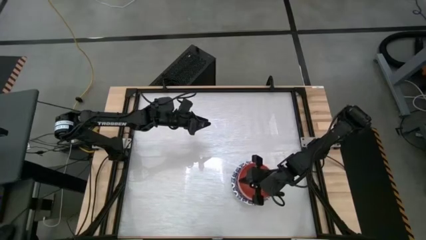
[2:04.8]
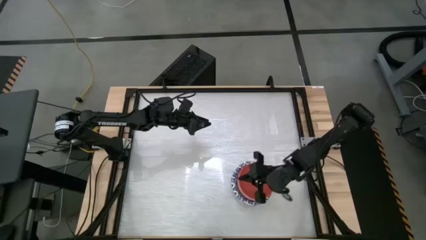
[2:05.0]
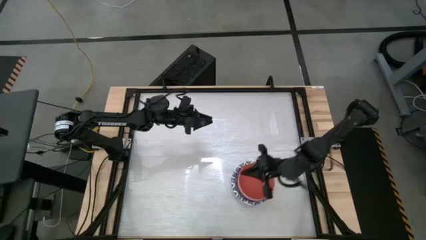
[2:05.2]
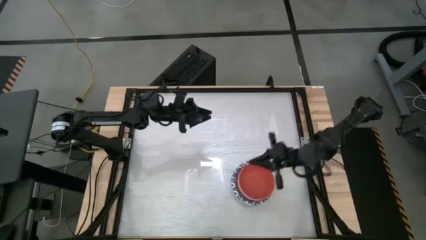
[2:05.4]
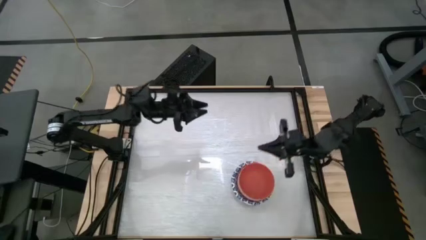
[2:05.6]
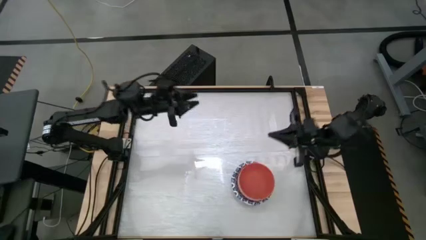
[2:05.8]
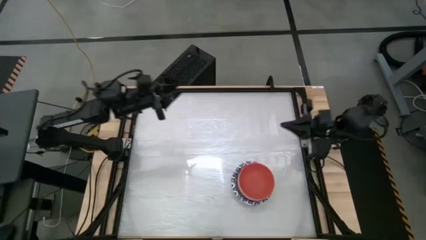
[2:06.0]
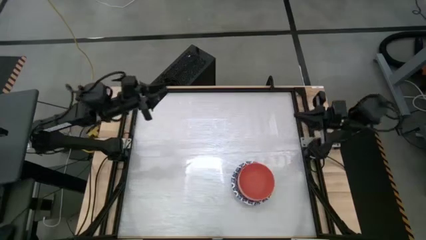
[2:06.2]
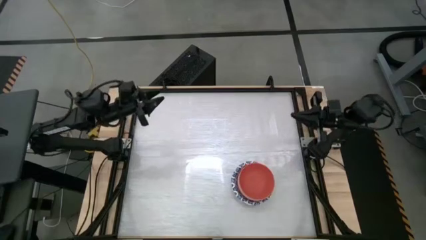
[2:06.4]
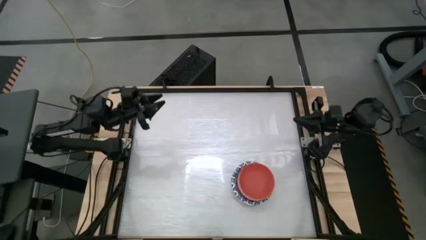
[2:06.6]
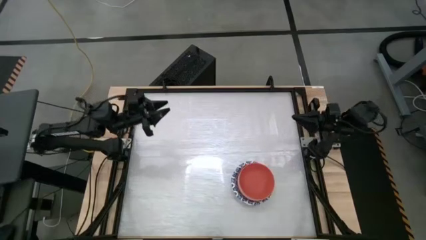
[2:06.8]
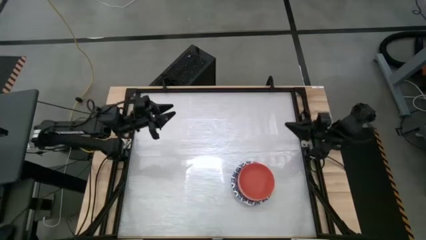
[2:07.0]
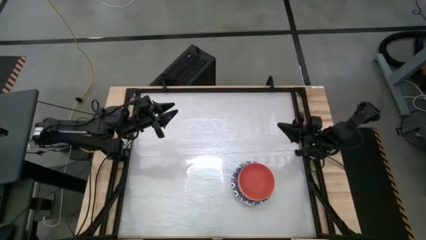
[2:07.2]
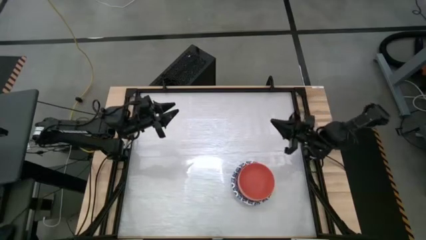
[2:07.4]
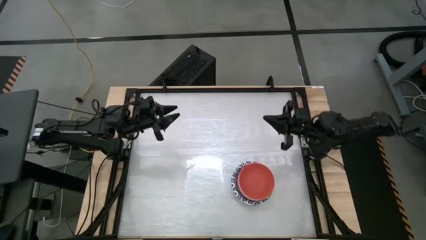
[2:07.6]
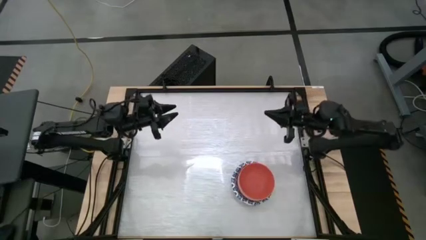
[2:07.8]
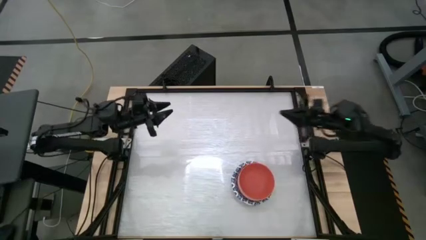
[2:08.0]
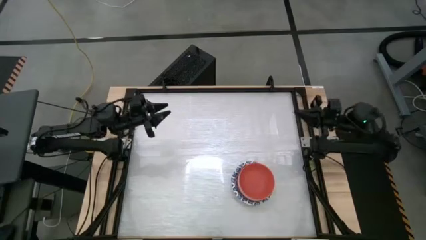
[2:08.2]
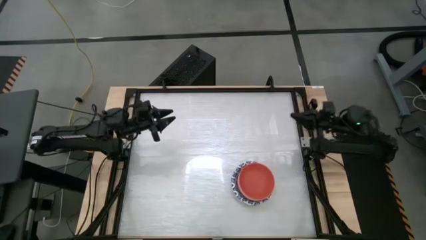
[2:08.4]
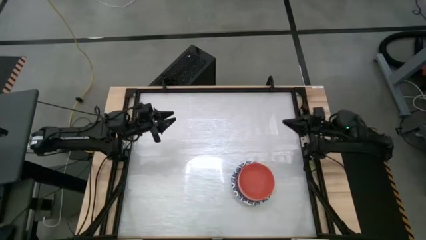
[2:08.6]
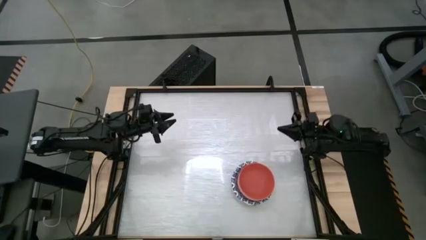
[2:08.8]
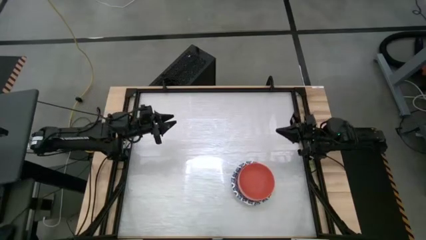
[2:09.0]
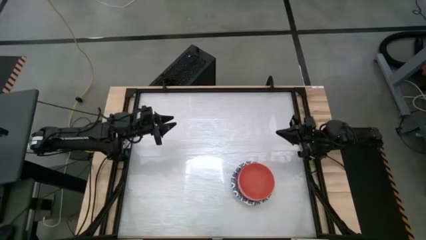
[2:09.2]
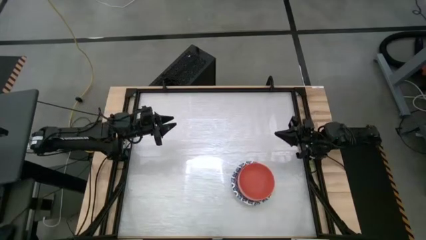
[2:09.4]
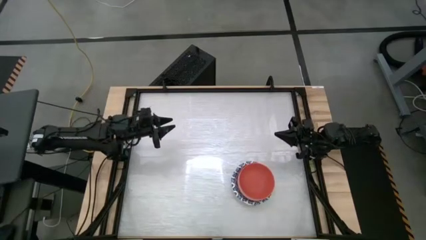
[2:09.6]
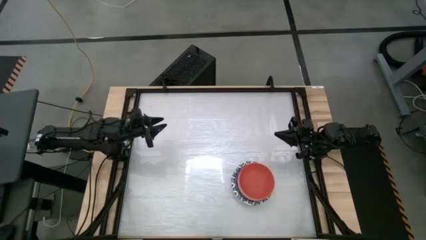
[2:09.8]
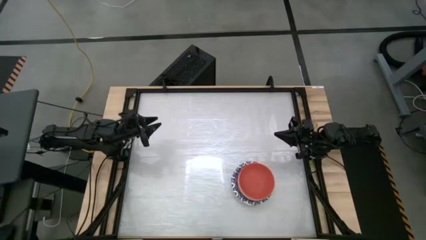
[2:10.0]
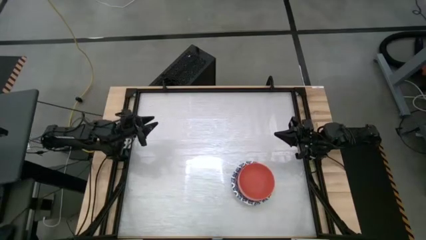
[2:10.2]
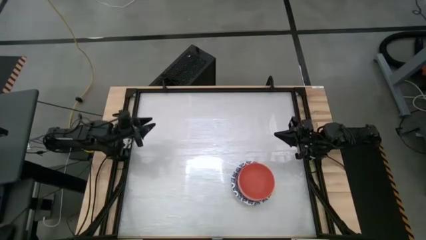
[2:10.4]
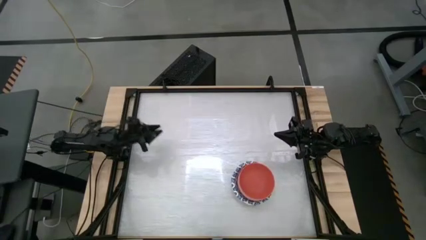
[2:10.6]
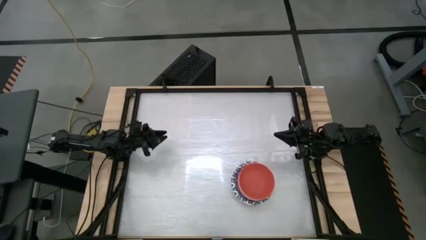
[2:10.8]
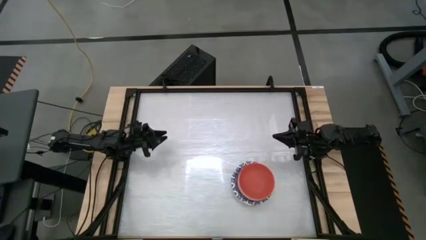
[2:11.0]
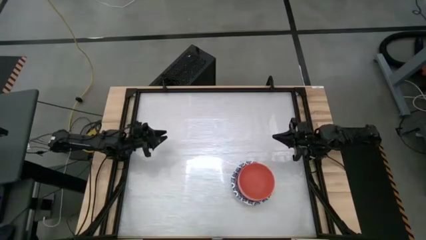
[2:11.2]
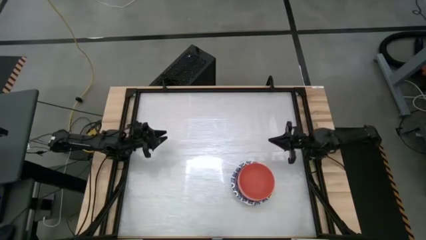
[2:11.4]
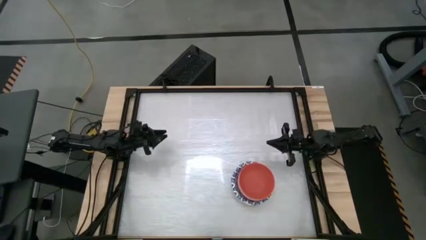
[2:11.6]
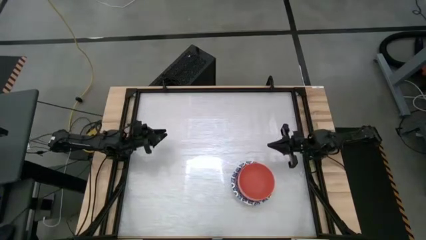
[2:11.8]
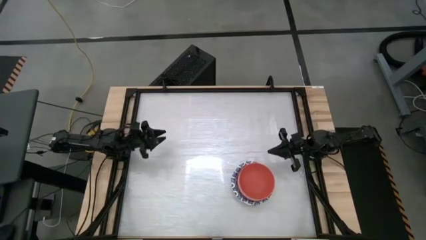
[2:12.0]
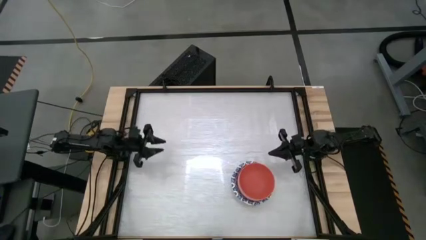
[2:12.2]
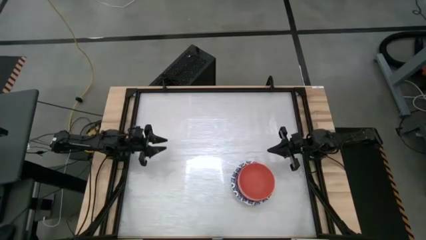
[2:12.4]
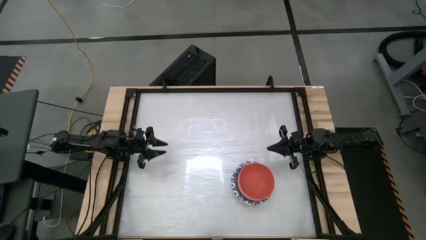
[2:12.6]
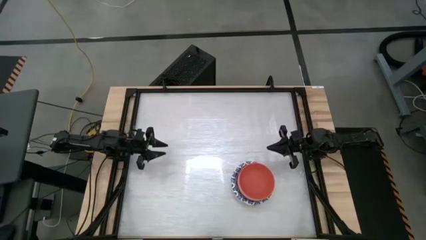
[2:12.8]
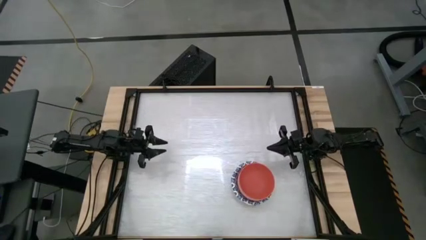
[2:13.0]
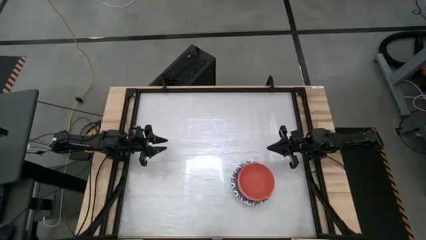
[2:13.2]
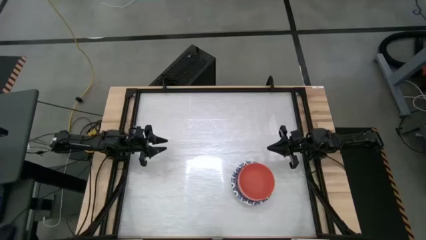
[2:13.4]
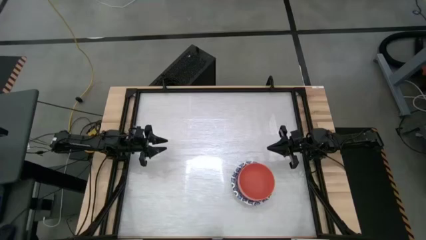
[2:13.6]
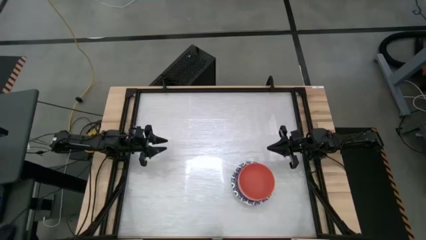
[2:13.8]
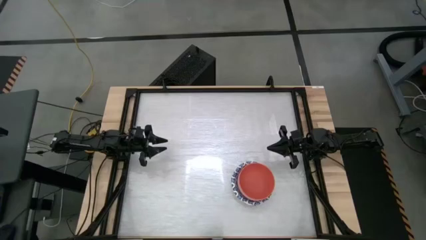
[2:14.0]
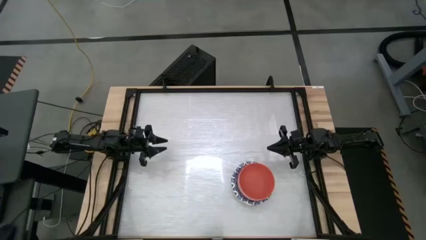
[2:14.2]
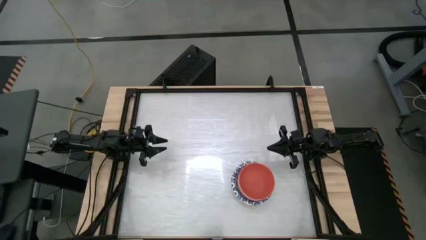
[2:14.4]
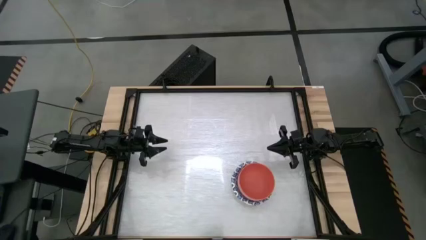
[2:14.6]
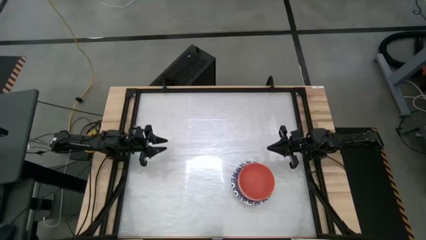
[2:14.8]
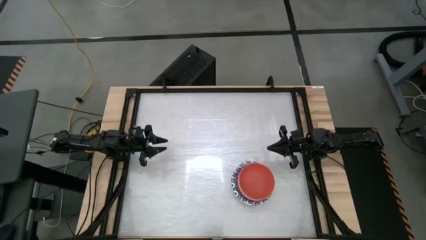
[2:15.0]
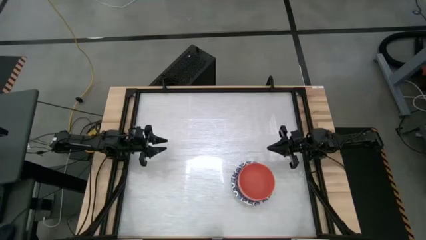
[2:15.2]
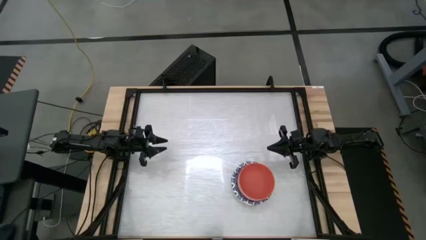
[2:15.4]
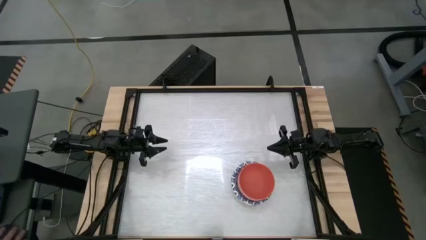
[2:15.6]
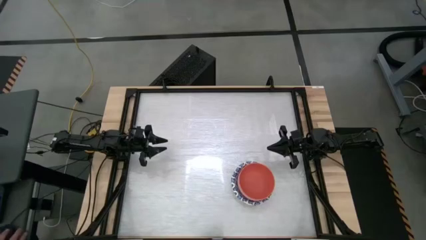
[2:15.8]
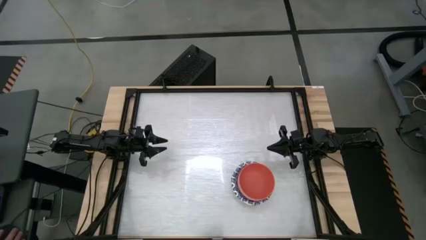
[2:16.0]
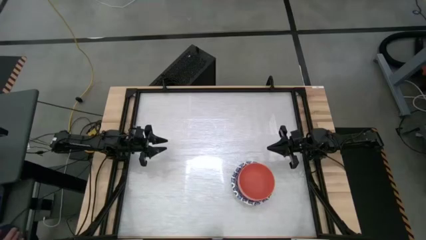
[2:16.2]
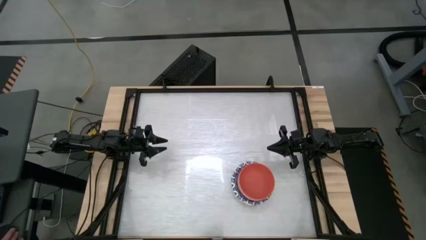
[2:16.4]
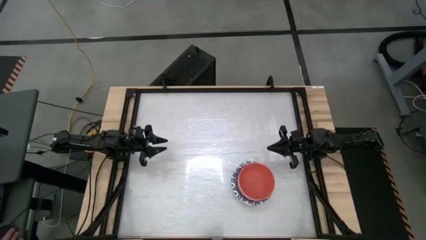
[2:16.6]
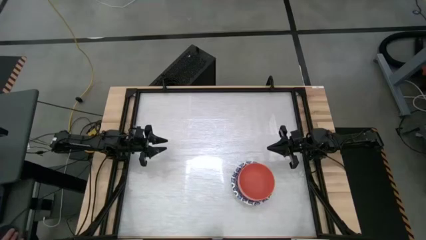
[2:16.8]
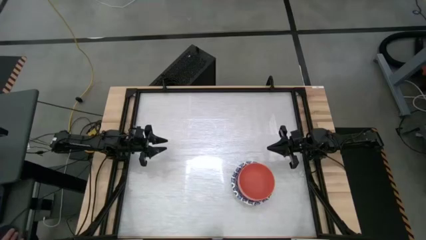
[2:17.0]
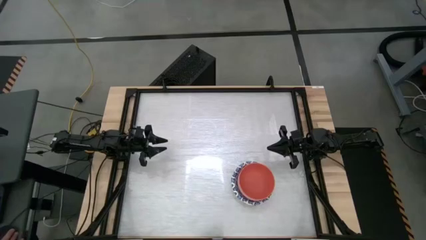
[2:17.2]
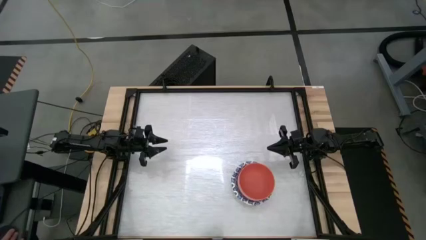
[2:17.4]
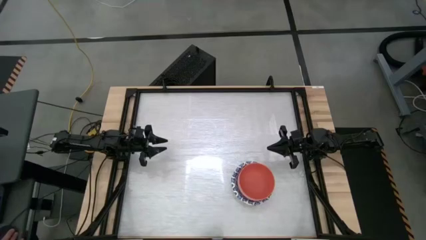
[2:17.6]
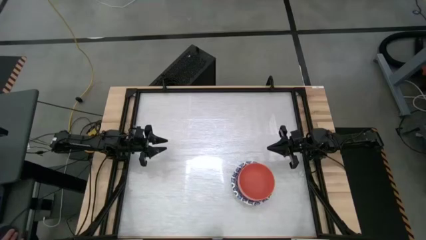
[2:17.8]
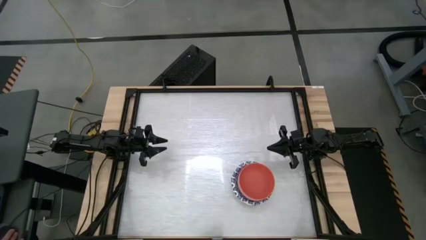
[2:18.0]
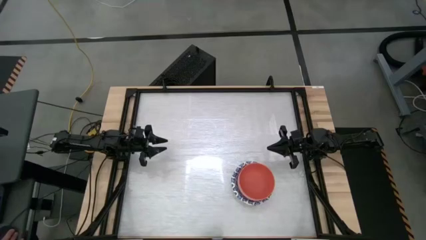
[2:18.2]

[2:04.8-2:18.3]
Return to Home Position
